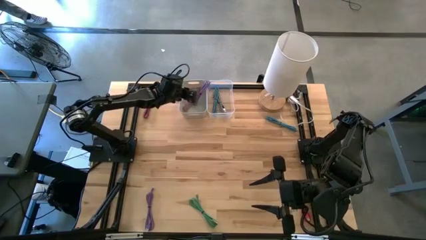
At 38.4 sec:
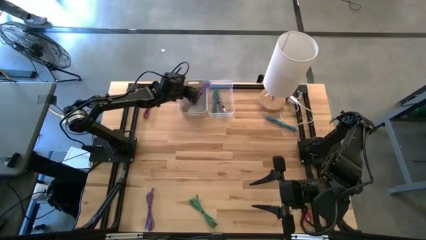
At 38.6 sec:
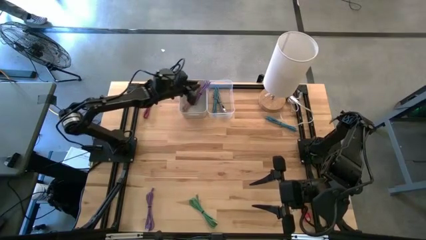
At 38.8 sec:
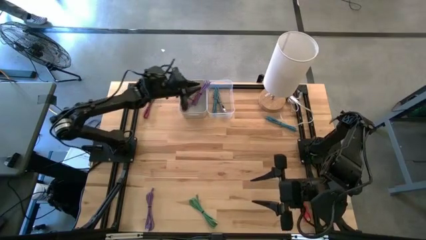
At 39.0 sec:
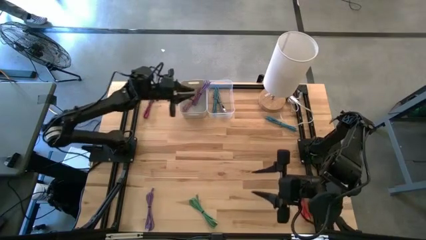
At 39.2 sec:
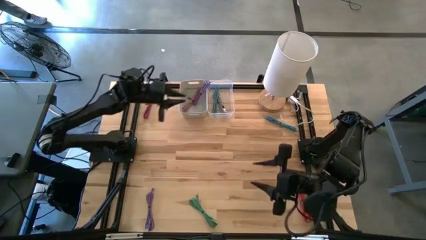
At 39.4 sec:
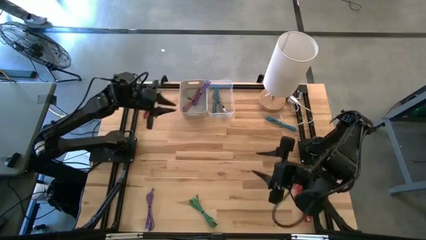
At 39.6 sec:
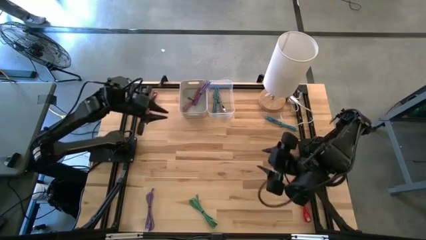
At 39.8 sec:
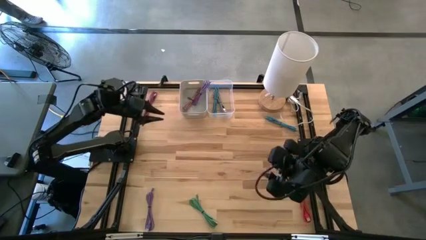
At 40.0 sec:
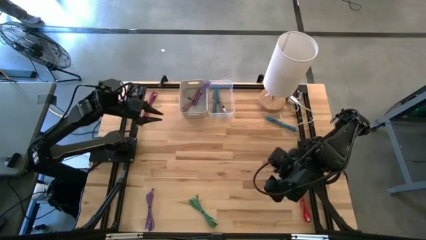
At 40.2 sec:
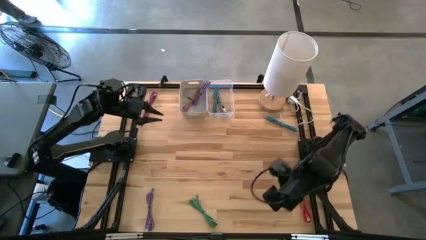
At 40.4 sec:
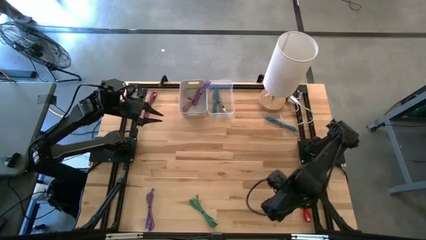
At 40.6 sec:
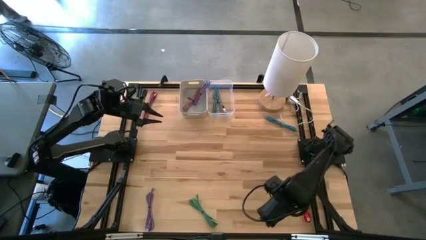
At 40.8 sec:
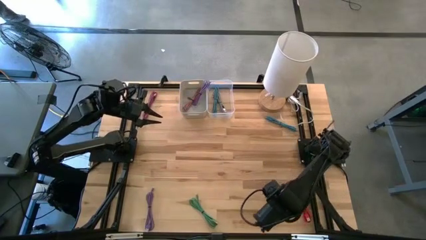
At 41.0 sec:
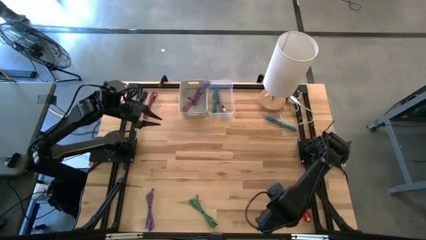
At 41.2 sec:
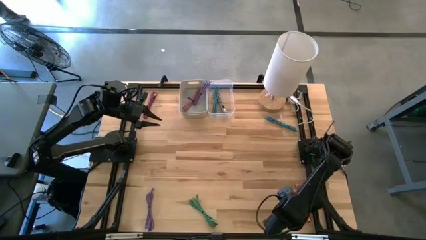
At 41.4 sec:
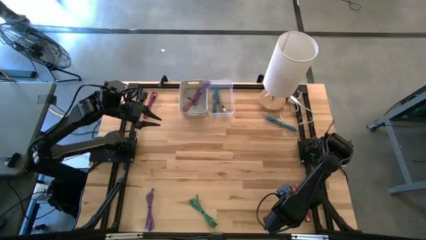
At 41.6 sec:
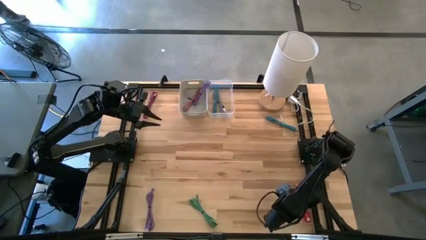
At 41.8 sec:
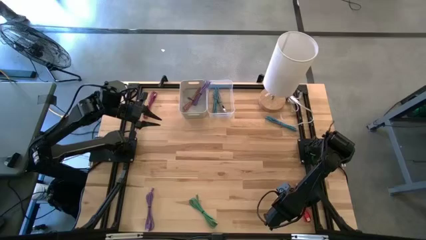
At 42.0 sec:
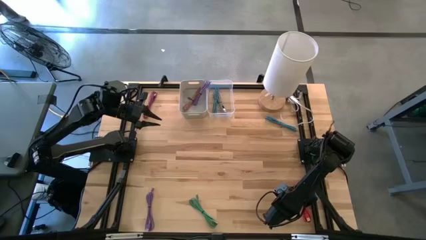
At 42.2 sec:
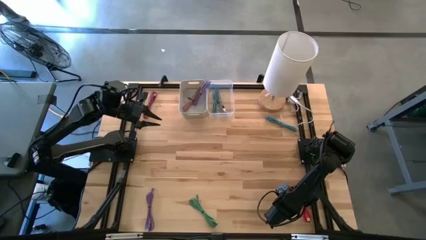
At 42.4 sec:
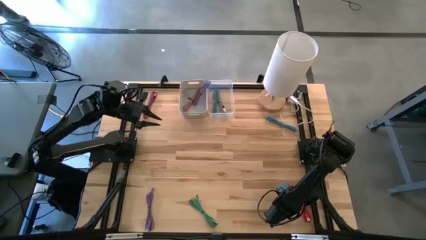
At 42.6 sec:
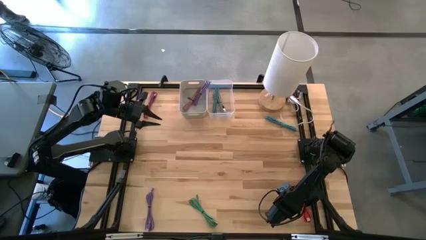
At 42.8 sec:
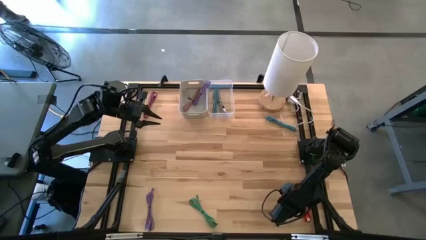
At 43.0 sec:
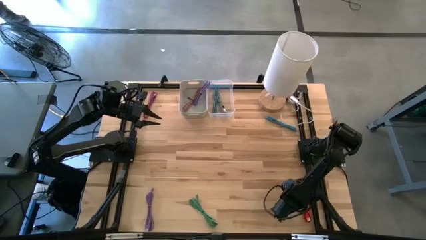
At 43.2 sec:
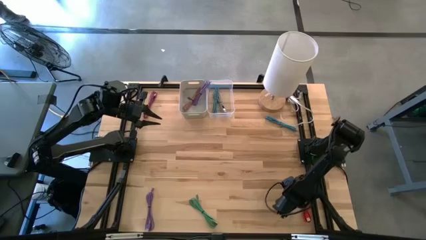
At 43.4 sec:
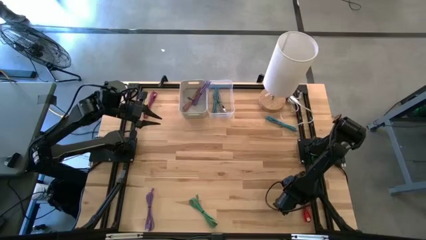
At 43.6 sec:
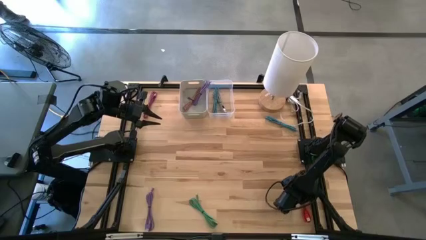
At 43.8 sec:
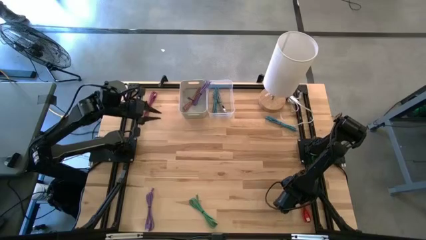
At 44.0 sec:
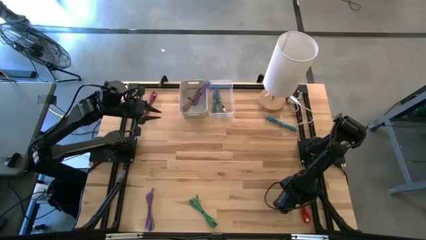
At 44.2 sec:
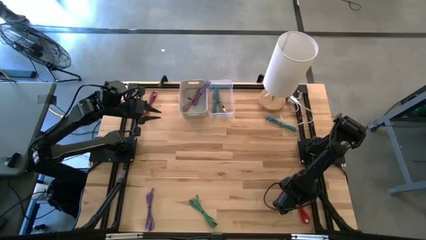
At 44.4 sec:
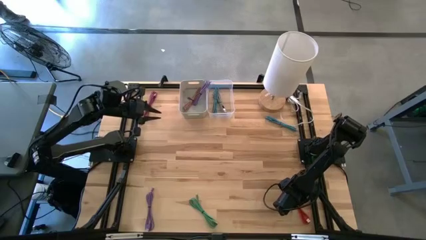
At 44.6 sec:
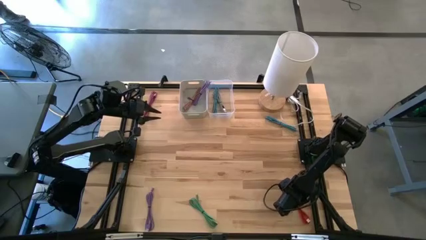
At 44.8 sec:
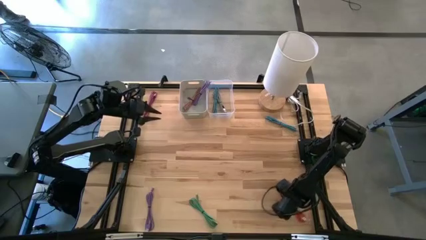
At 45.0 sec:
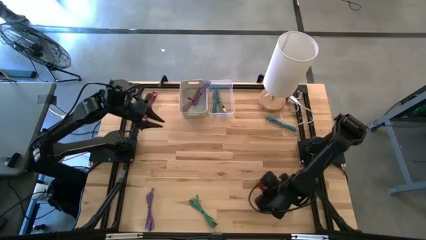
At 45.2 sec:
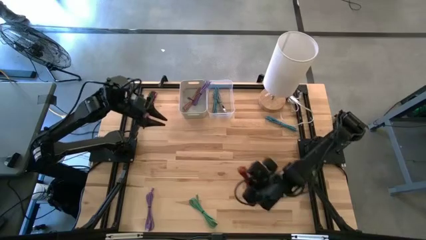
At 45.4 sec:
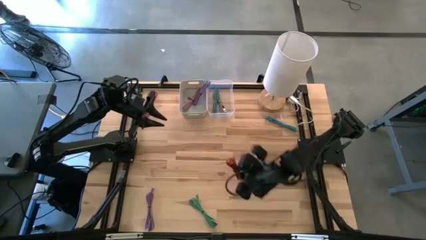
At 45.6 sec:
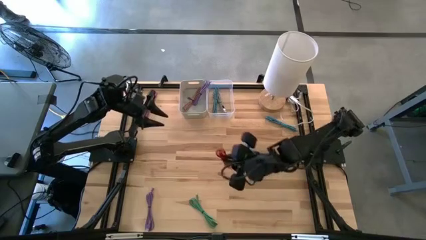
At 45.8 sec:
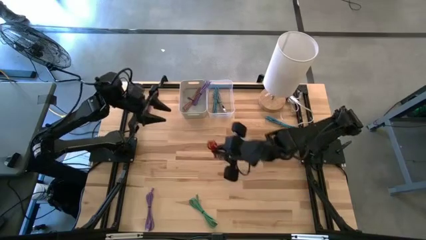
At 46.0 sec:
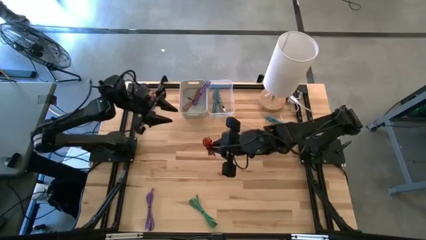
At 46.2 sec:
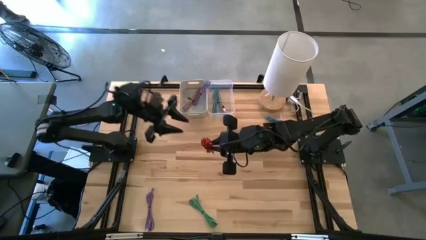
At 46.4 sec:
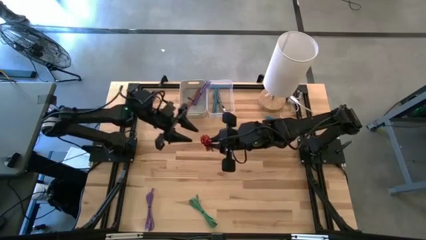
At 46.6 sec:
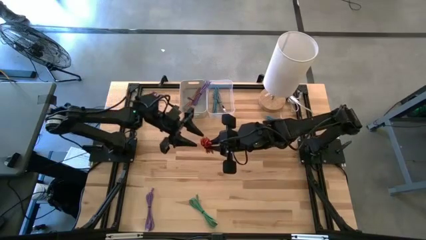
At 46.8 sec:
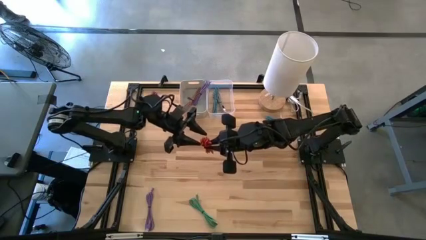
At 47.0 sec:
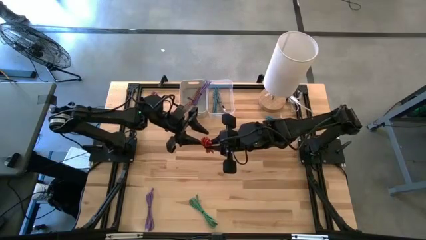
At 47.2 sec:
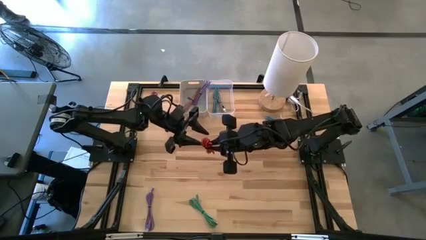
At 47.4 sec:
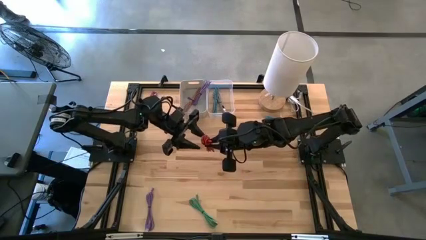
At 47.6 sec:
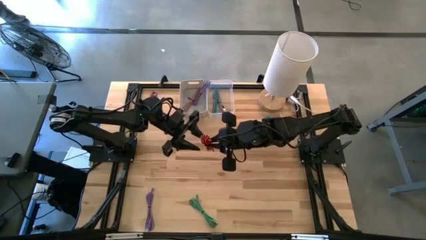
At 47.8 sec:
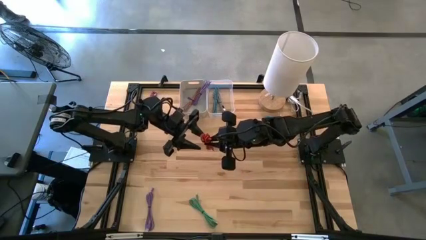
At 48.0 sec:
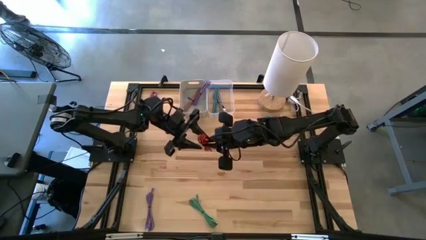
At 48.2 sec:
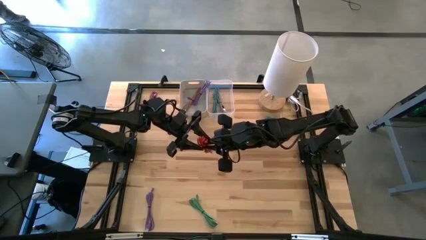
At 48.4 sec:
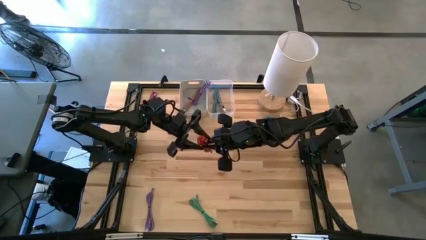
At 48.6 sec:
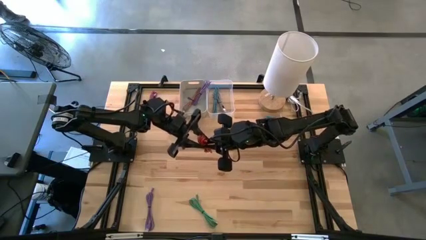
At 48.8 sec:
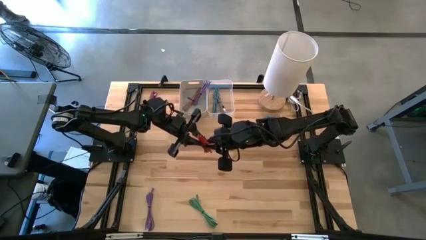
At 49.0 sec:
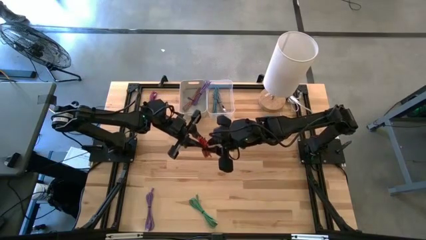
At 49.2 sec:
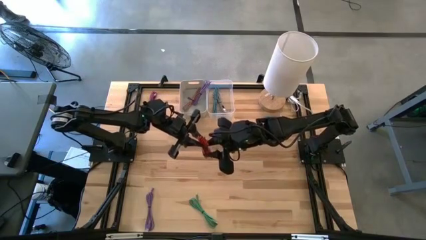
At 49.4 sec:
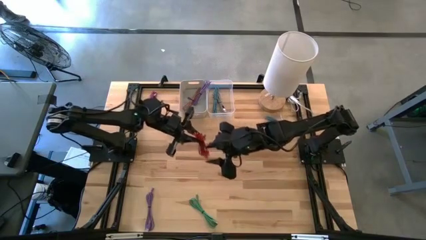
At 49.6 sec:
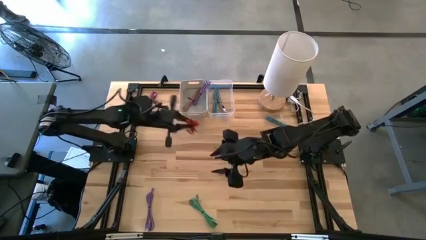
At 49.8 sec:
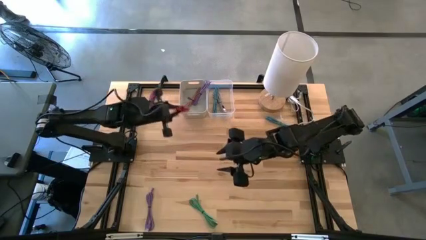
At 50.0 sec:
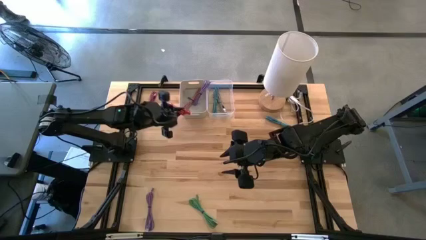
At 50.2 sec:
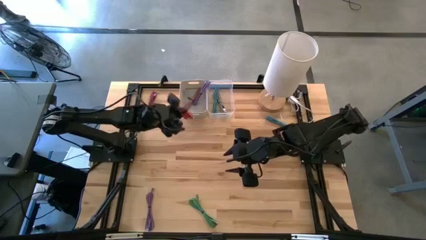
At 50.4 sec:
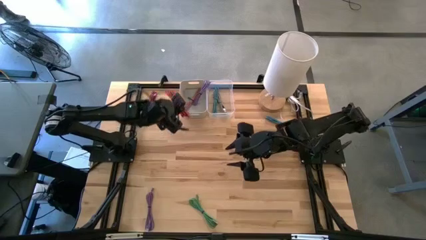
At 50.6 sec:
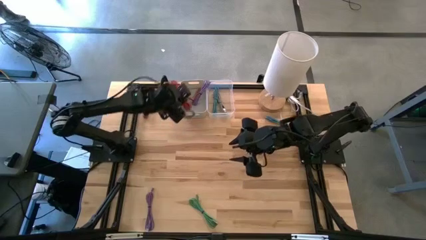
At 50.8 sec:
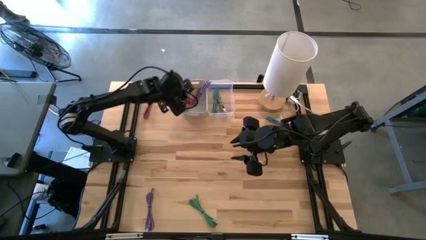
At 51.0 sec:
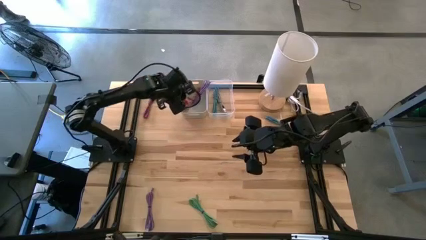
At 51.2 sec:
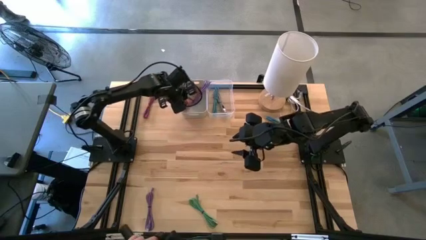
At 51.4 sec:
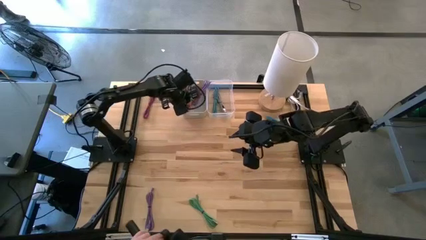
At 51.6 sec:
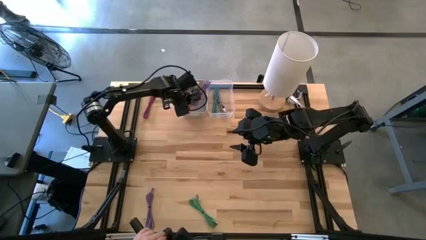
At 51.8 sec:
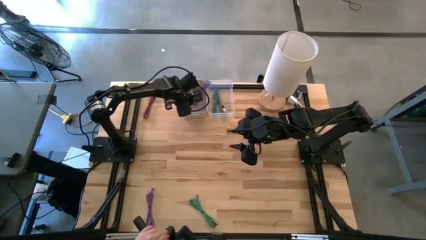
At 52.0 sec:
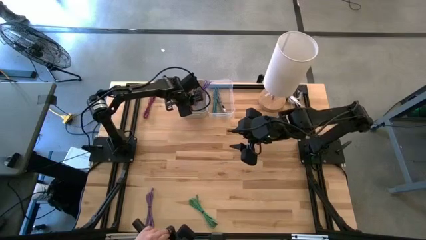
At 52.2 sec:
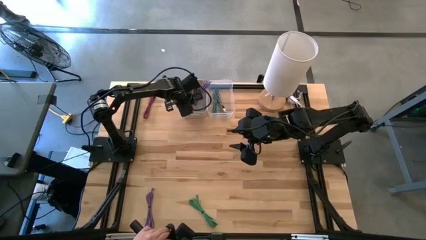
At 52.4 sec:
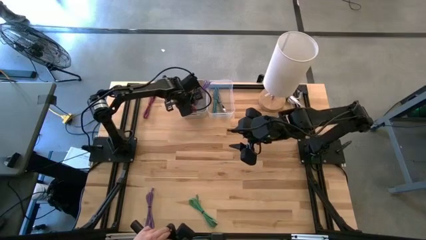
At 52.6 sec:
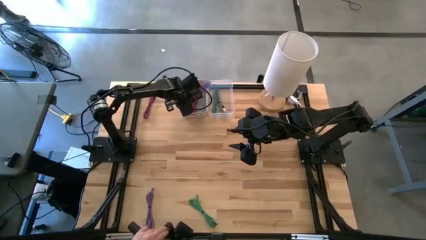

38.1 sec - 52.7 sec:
Task: Pick & Place USB Port
Put the orange USB cable into the gray bin
